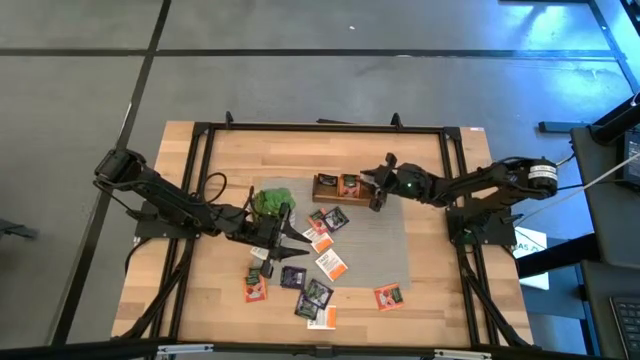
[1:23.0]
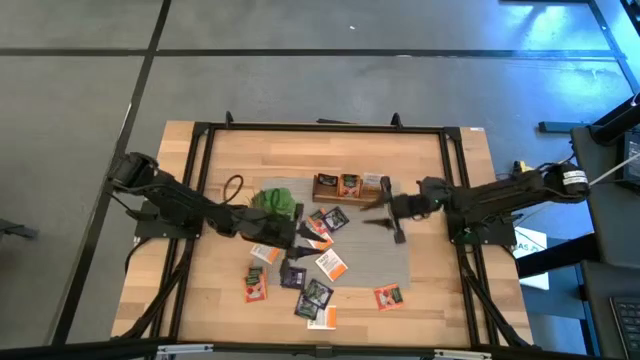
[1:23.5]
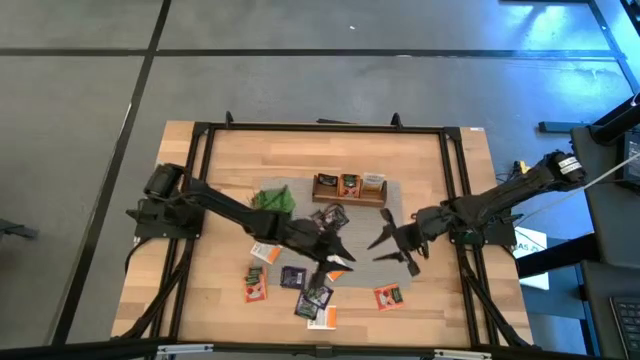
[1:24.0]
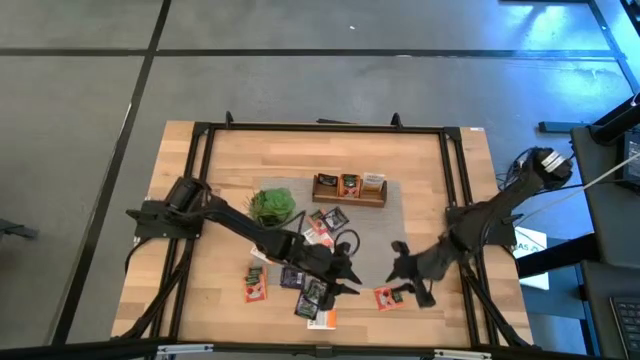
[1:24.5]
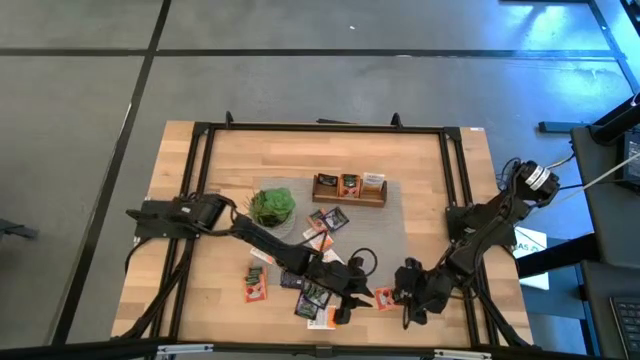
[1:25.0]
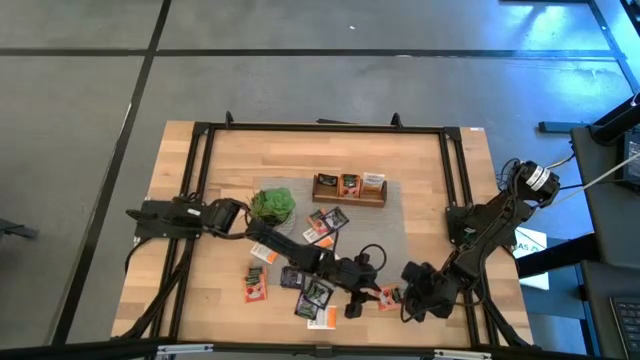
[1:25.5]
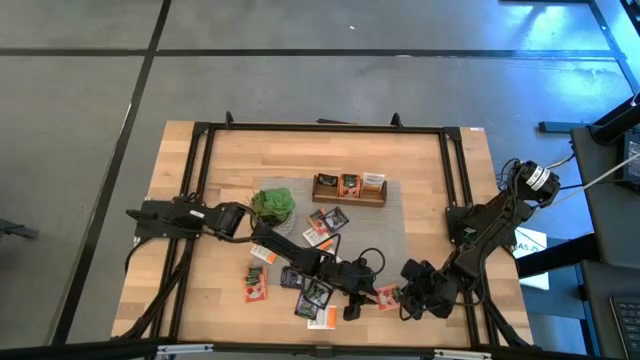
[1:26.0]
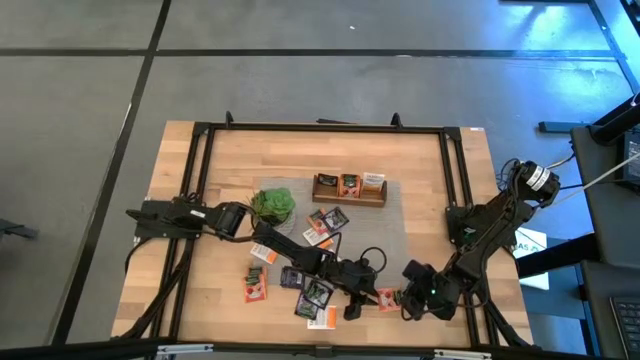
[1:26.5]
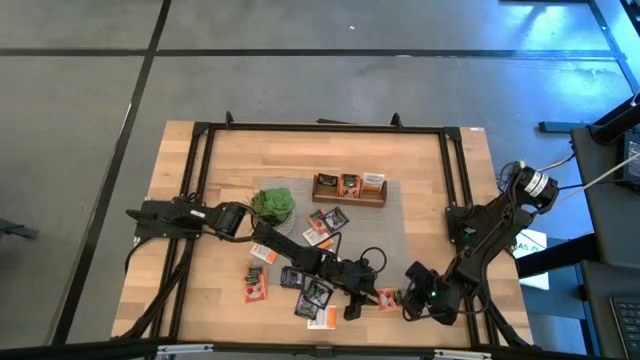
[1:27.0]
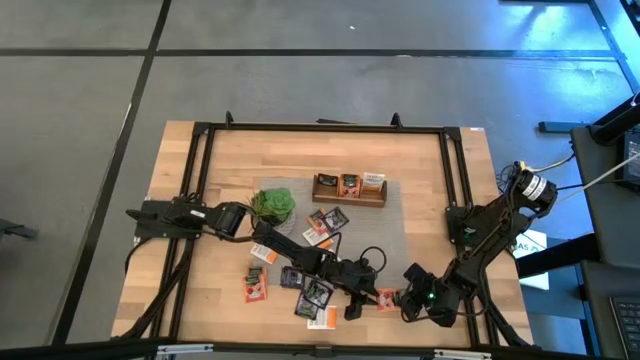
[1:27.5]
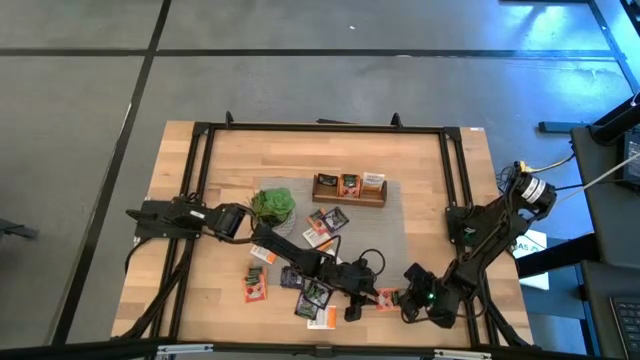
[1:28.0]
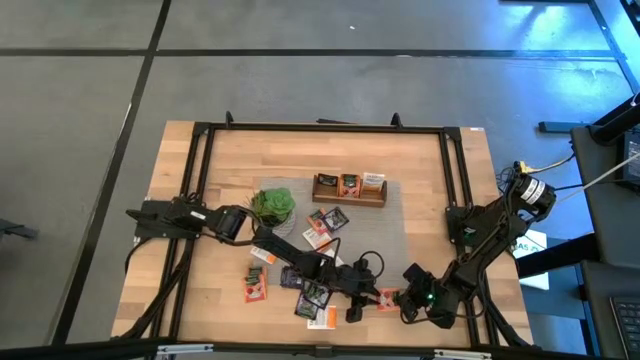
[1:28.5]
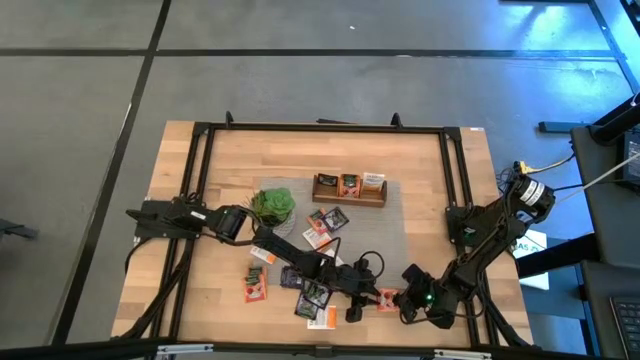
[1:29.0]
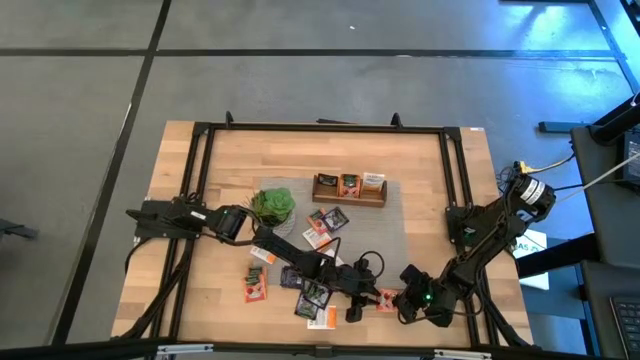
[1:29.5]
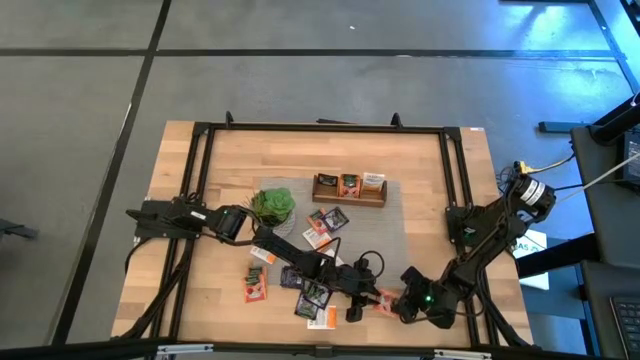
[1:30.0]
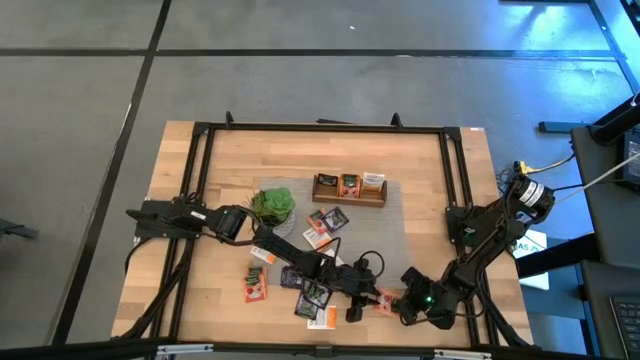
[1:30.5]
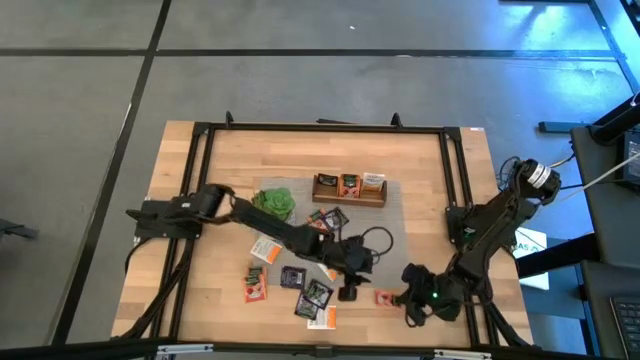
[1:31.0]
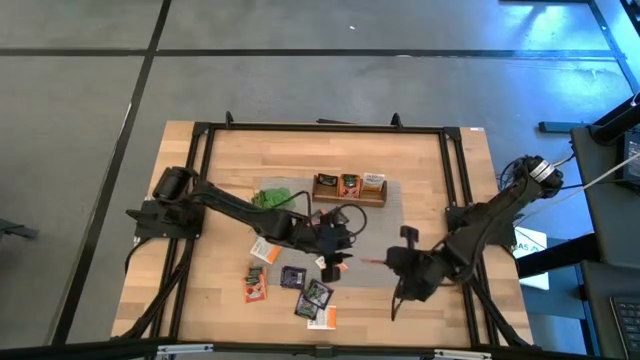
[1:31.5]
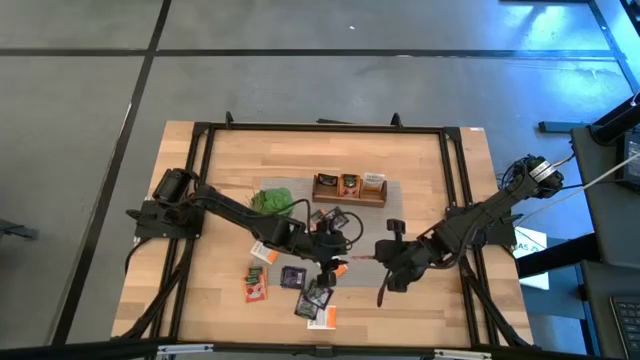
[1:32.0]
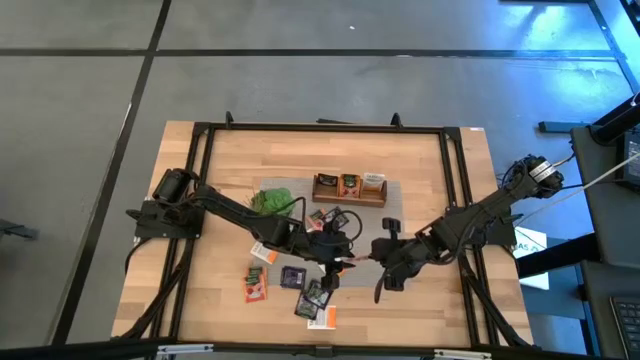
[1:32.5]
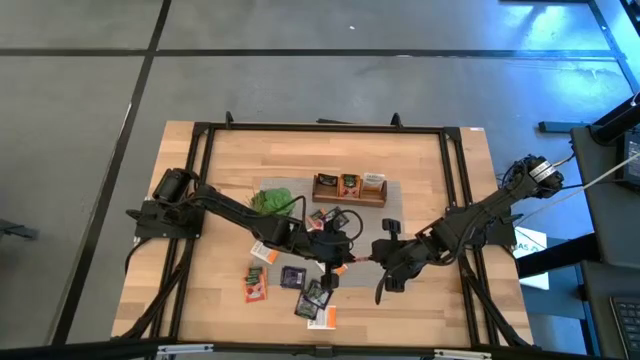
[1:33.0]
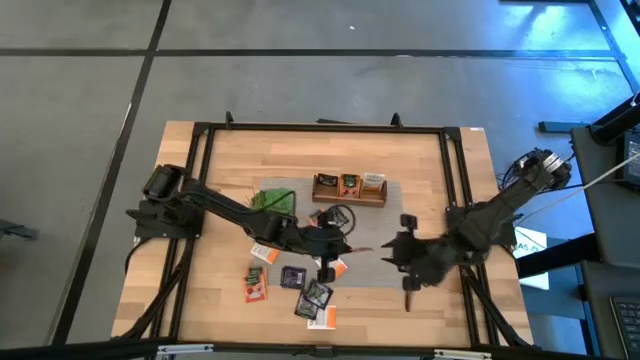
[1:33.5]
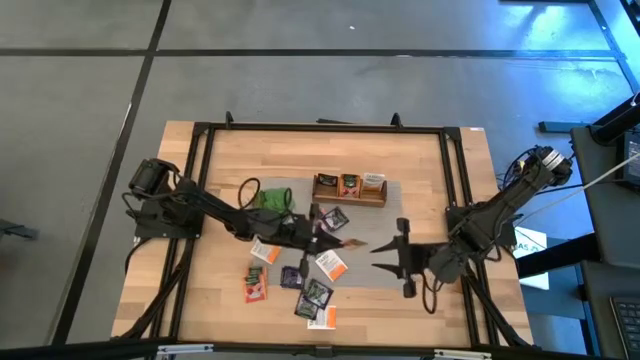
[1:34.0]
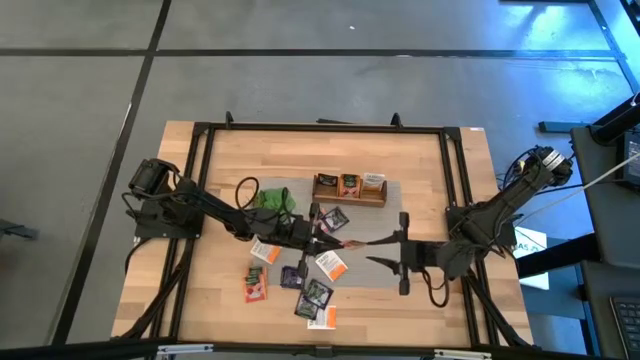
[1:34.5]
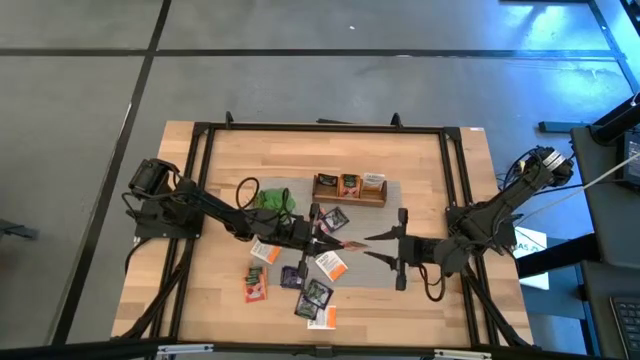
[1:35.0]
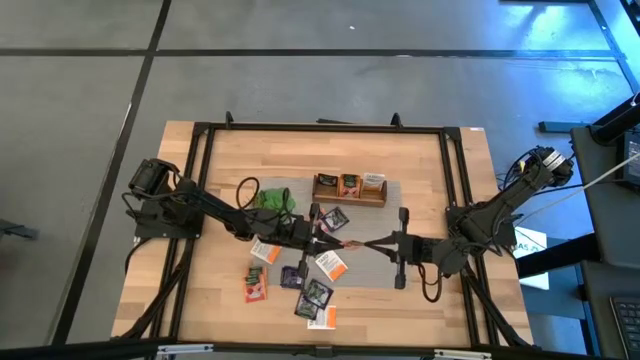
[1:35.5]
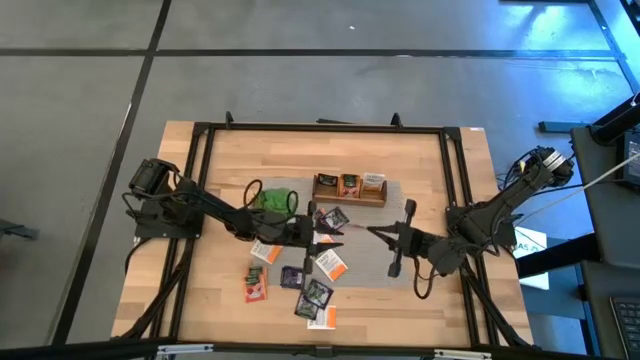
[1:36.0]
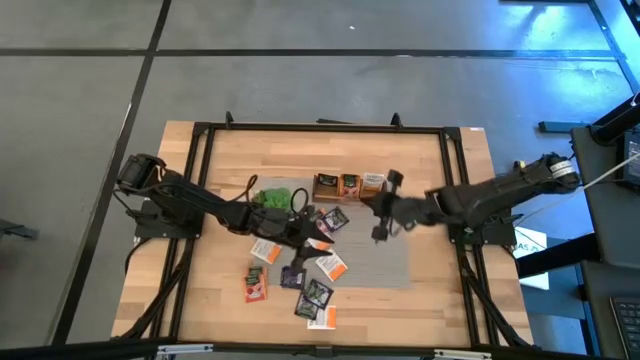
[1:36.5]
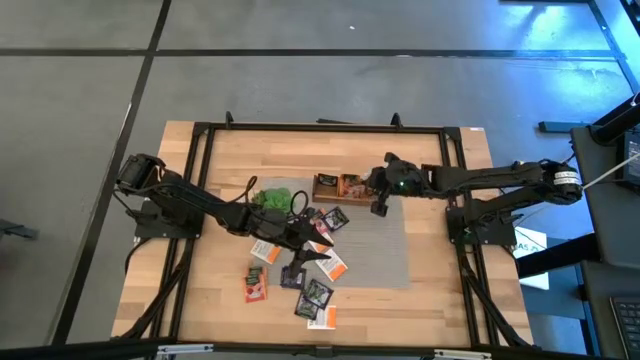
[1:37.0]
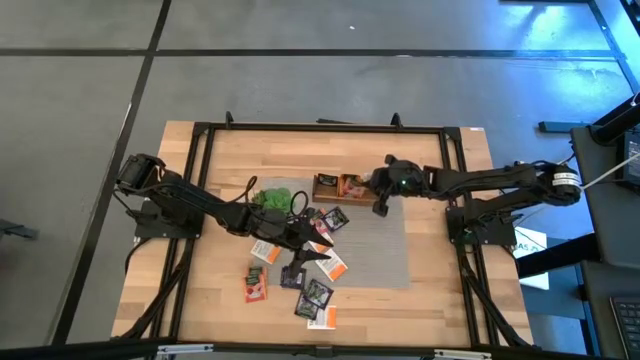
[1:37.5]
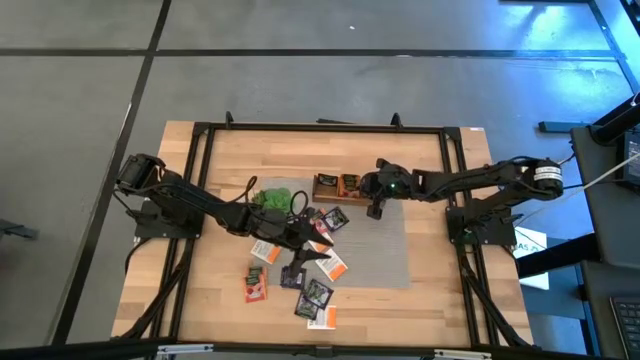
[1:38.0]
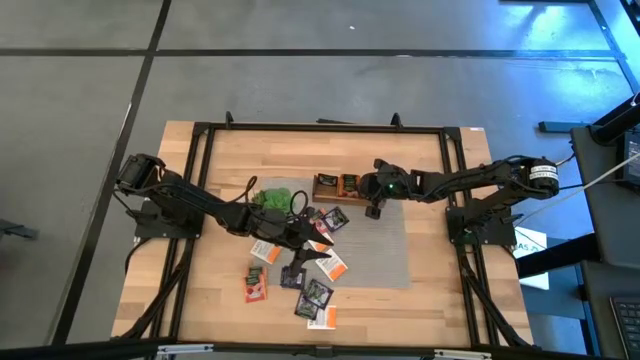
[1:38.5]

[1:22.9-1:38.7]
Task: Pick & Place Tea
Put the orange tea bag into the middle section of the wooden organizer

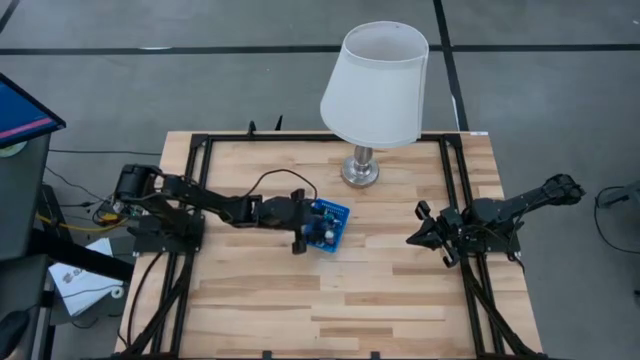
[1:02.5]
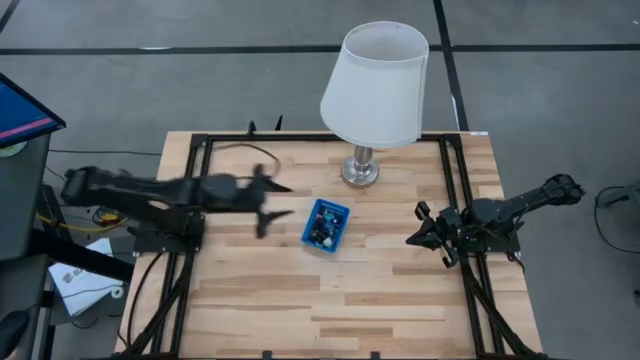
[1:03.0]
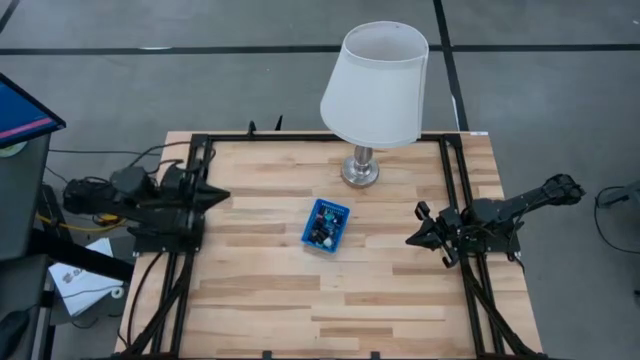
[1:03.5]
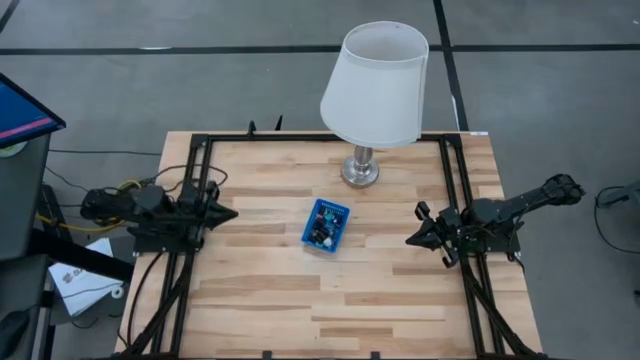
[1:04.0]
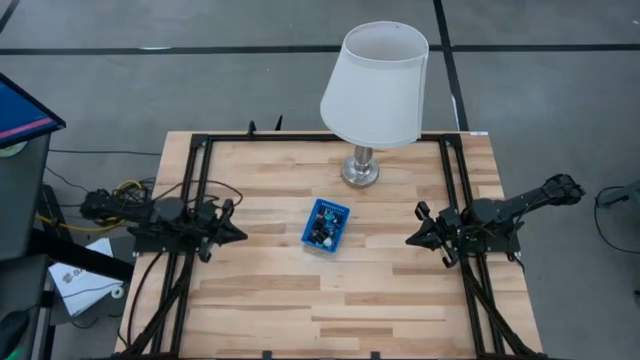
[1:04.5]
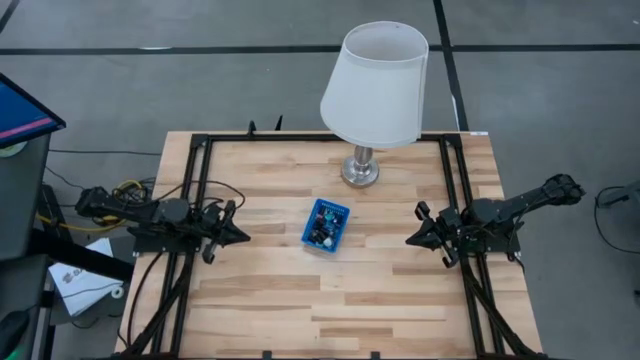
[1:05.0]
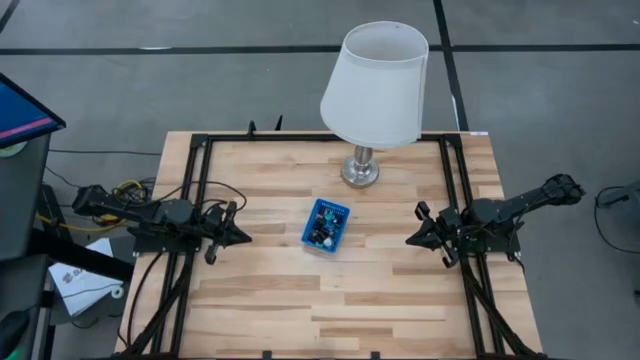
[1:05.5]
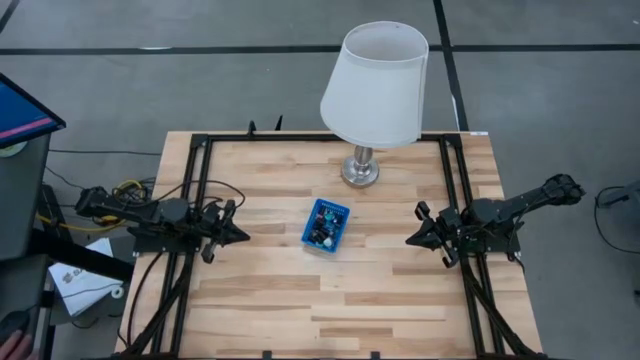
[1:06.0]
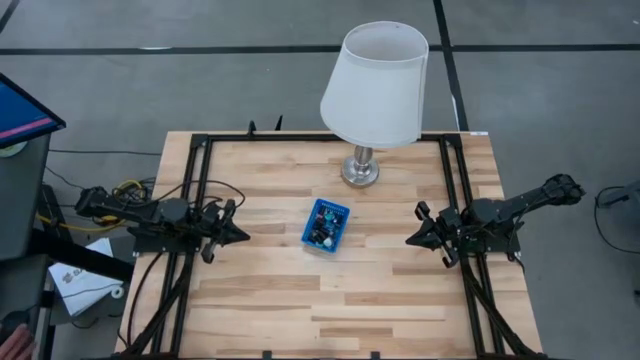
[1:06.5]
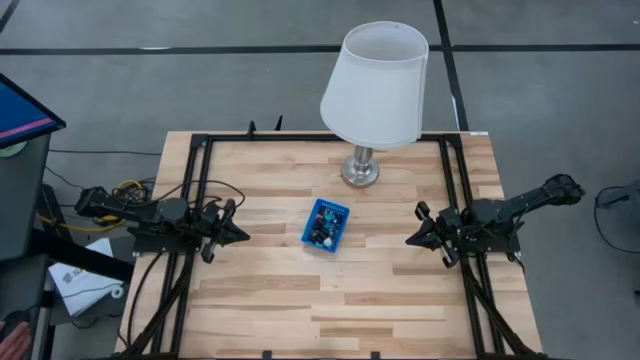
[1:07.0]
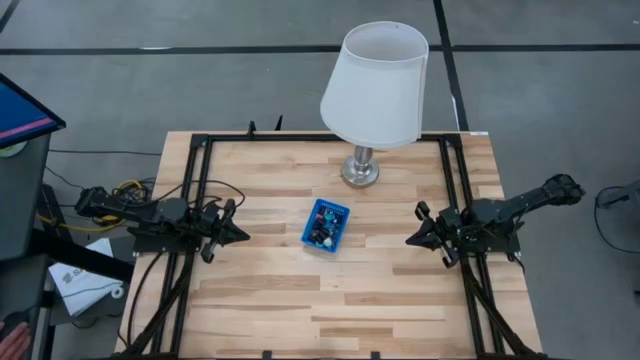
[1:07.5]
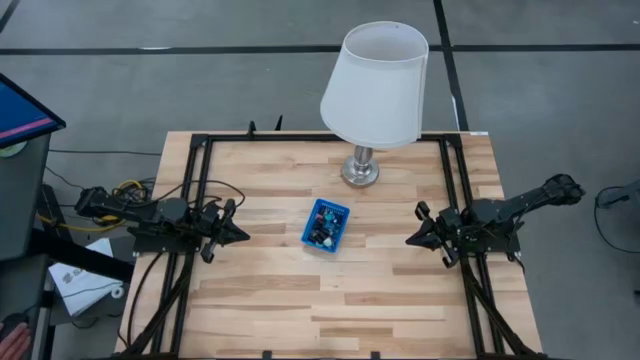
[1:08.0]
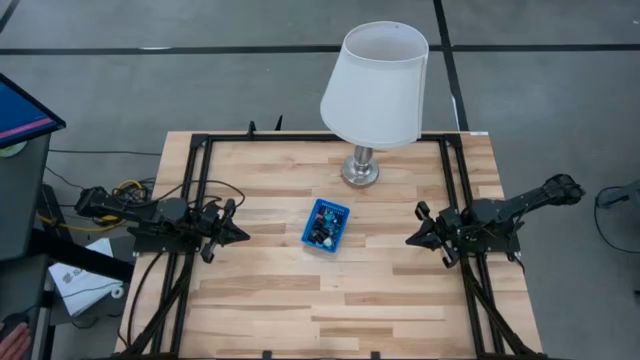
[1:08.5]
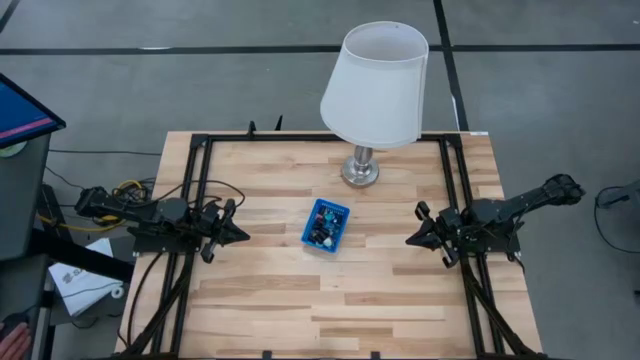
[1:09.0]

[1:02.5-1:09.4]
Task: Pick & Place Nail Polish
Return to Home Position
